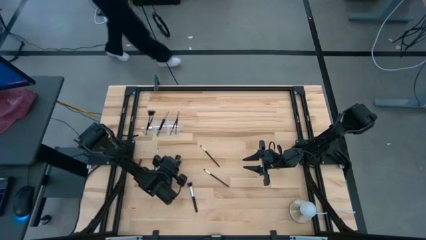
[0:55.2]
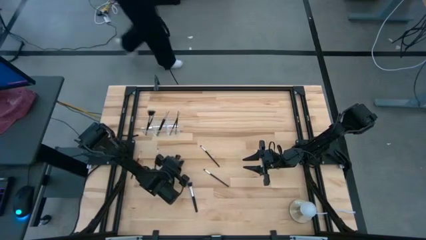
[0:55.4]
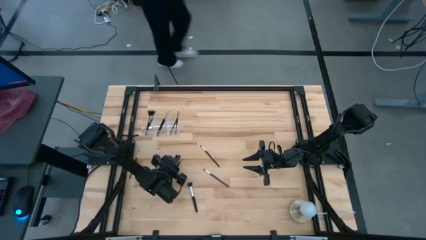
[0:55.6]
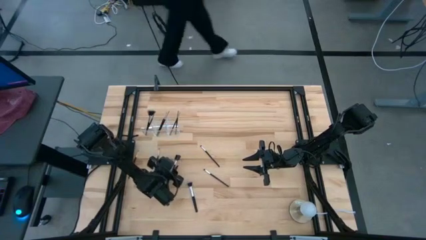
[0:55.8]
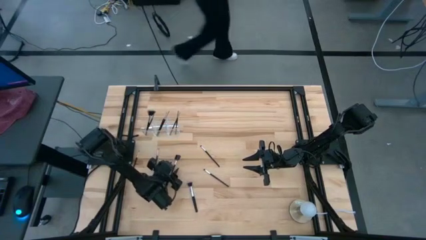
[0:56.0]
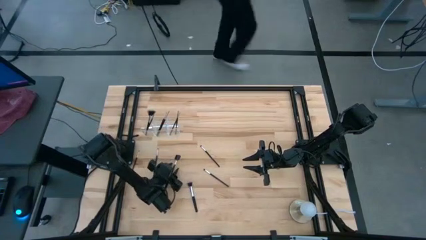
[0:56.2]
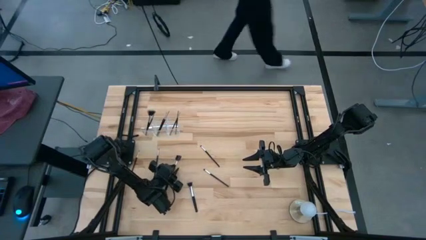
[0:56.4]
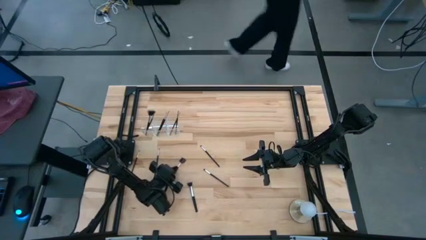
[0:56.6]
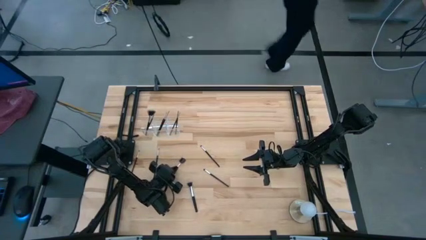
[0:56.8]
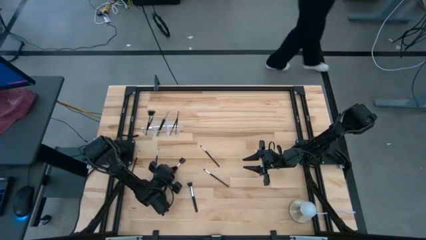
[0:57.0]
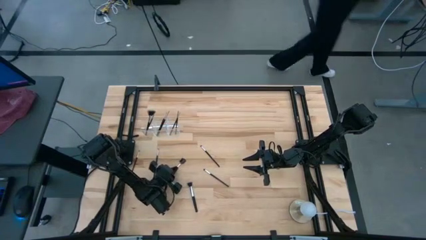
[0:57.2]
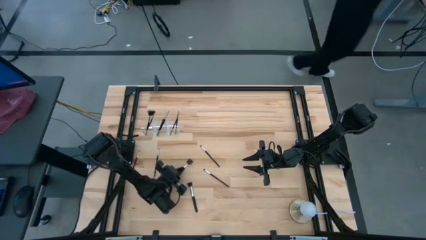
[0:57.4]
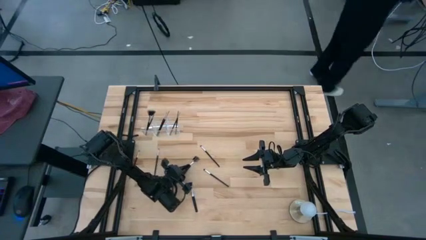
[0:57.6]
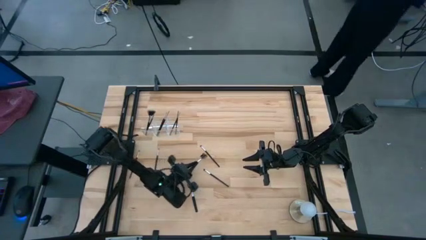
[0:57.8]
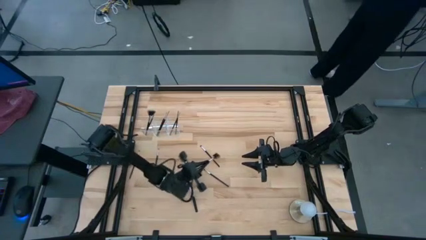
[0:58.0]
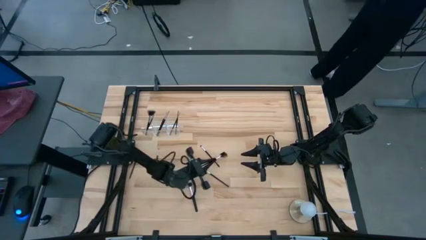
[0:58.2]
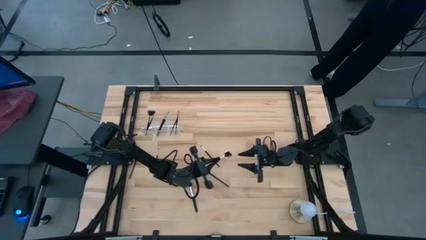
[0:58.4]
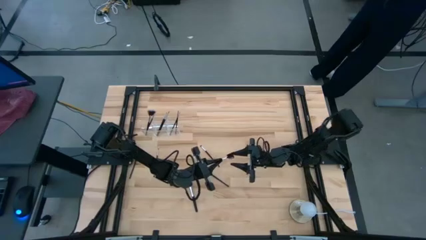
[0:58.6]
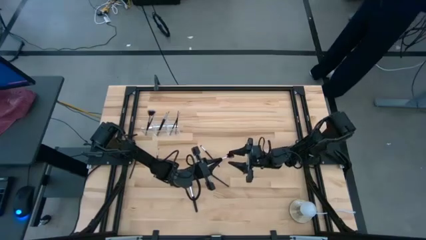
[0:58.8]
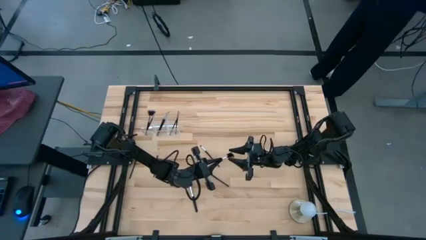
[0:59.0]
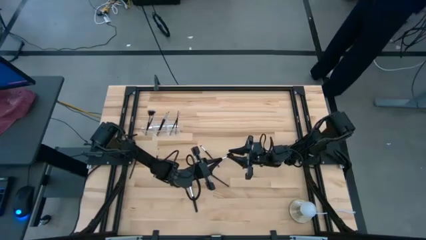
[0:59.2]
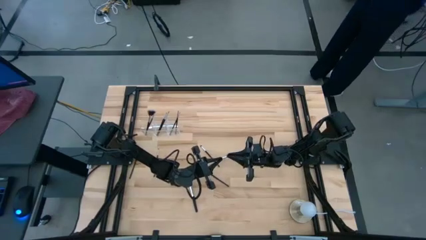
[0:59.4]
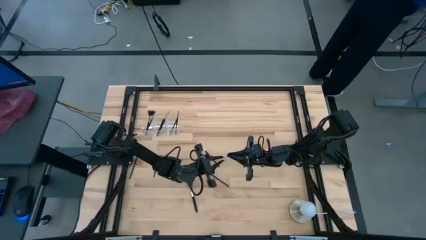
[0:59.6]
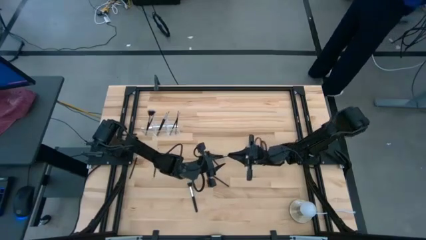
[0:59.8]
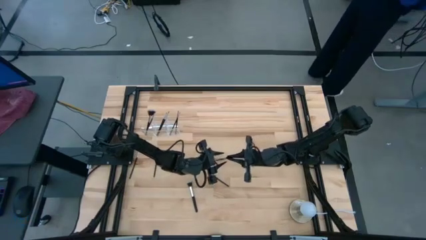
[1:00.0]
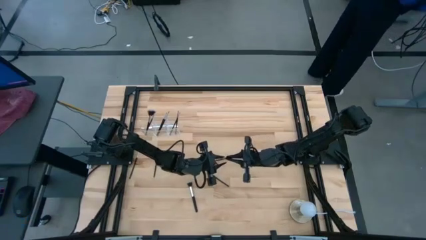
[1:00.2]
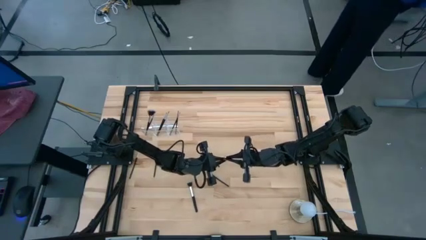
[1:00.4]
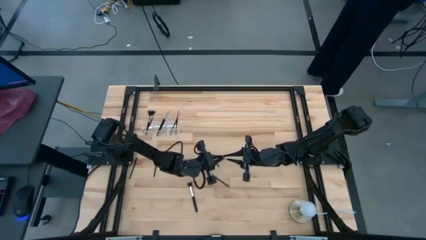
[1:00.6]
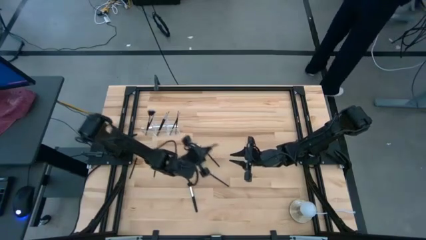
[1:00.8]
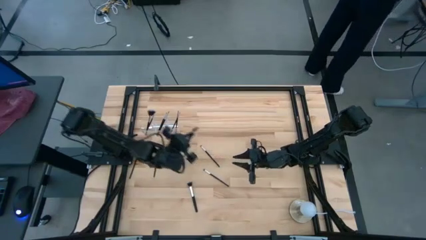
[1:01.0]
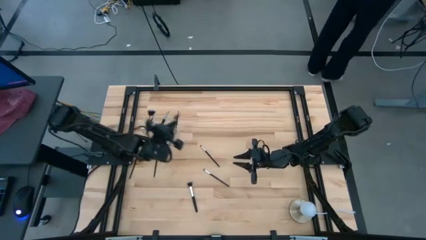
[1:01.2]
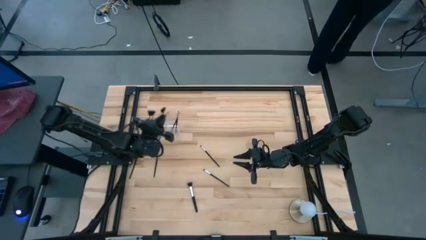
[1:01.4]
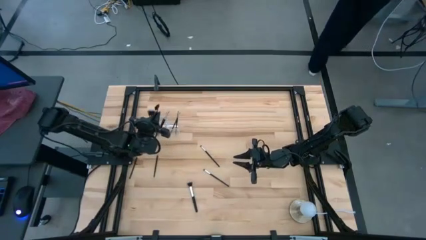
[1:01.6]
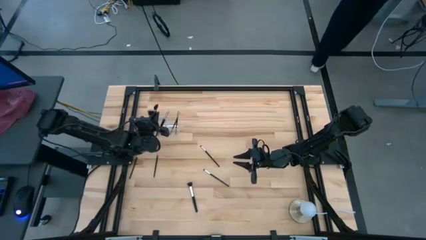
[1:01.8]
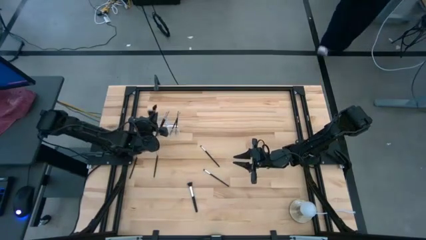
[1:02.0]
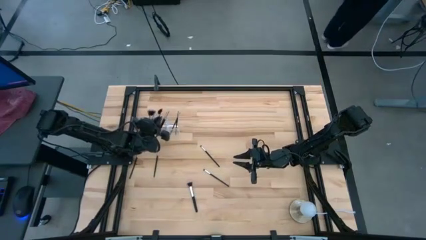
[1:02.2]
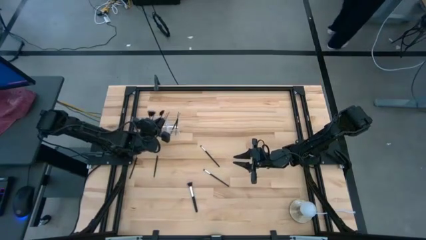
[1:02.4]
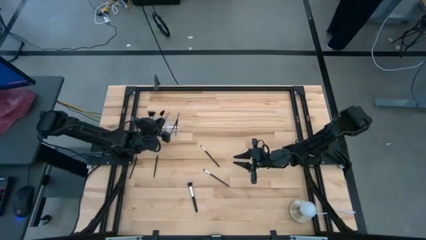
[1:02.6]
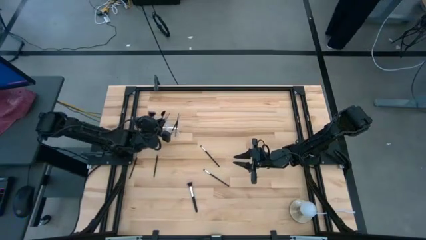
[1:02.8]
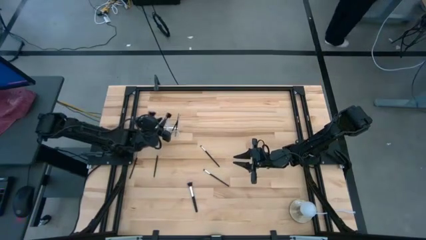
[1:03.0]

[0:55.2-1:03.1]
Task: Put items in baskets/containers
Put the eye groomer brush into the transparent organizer

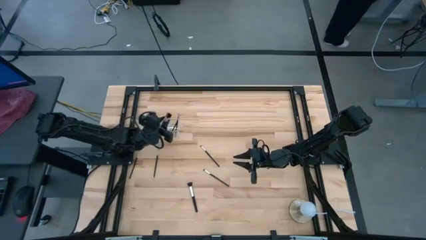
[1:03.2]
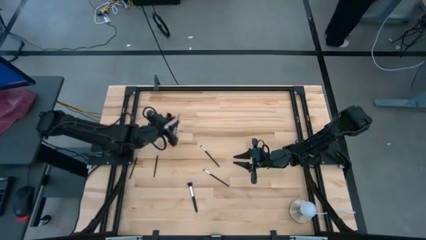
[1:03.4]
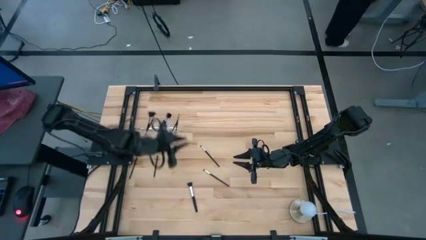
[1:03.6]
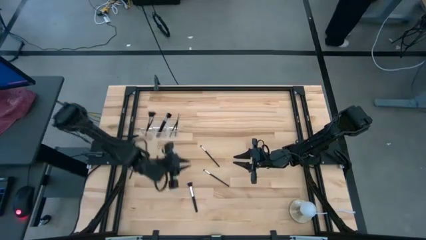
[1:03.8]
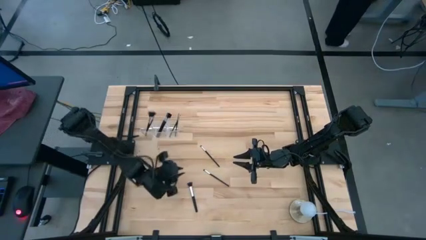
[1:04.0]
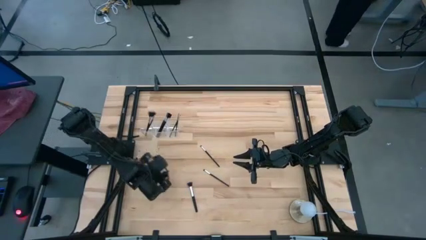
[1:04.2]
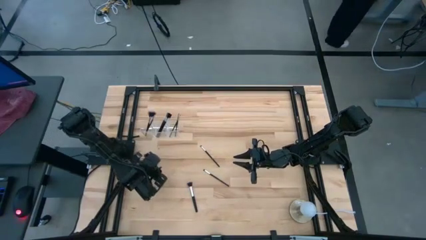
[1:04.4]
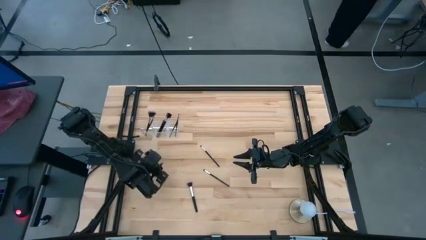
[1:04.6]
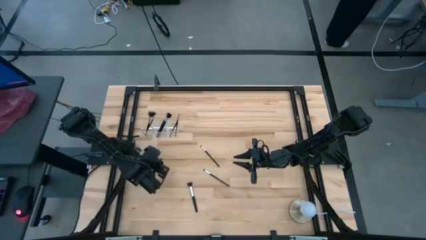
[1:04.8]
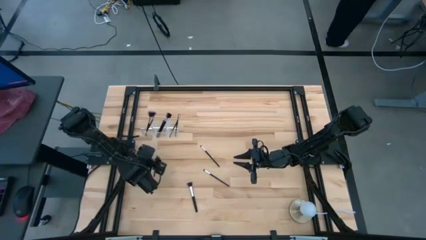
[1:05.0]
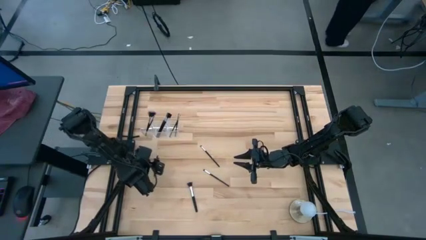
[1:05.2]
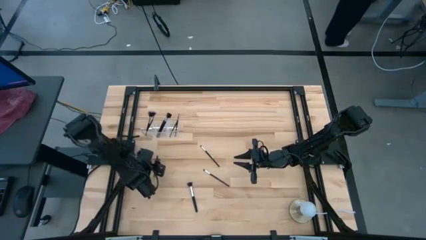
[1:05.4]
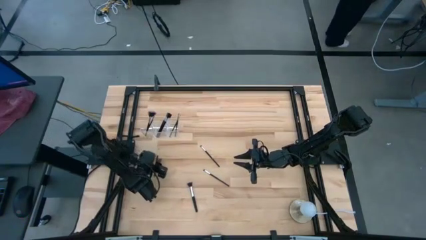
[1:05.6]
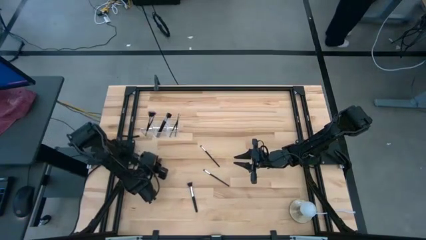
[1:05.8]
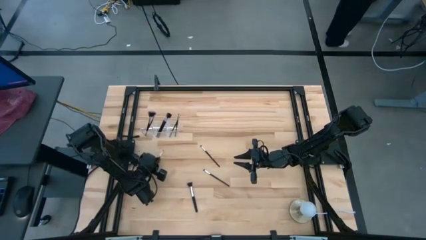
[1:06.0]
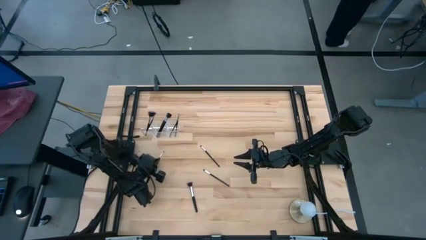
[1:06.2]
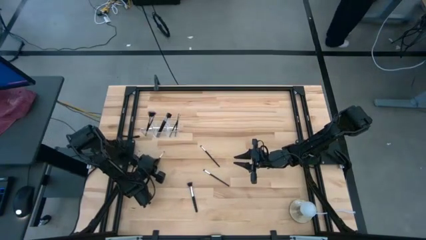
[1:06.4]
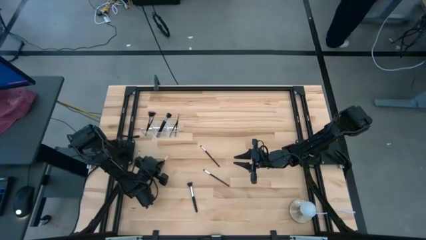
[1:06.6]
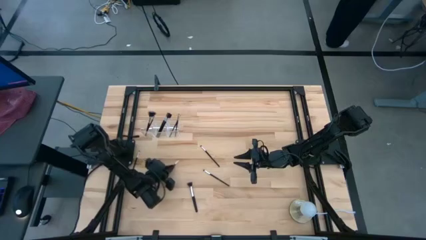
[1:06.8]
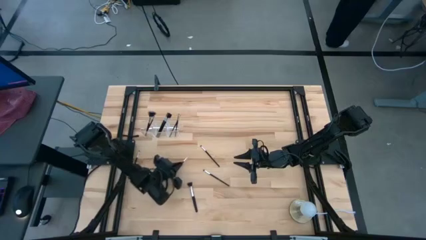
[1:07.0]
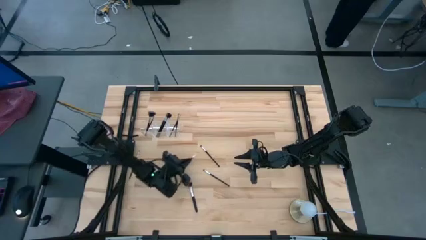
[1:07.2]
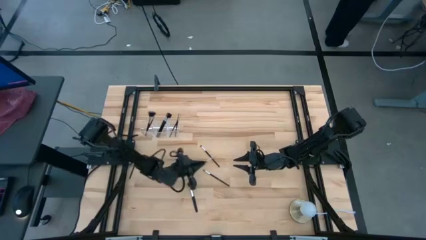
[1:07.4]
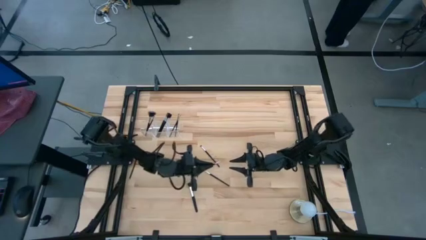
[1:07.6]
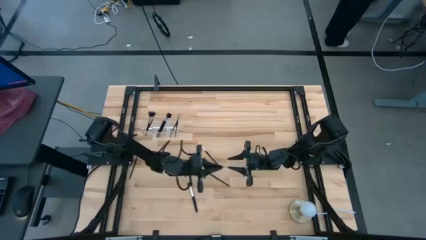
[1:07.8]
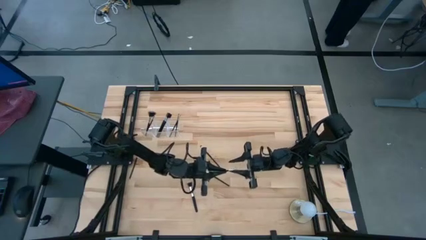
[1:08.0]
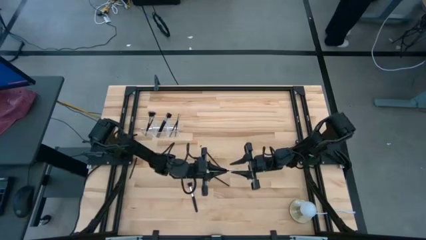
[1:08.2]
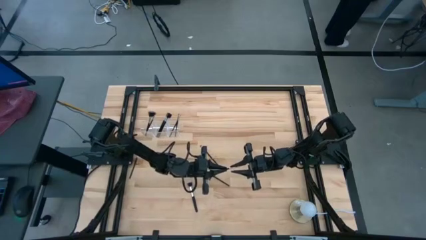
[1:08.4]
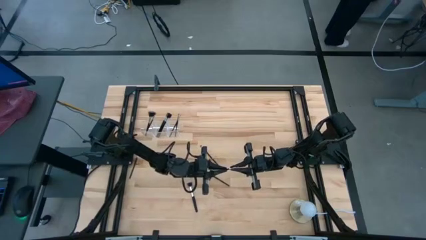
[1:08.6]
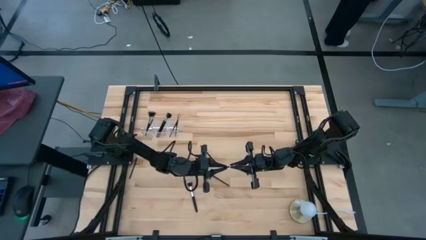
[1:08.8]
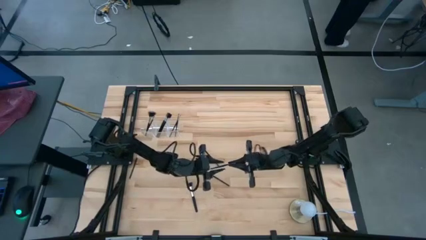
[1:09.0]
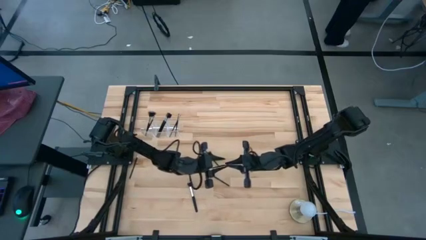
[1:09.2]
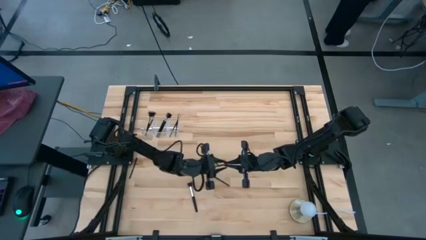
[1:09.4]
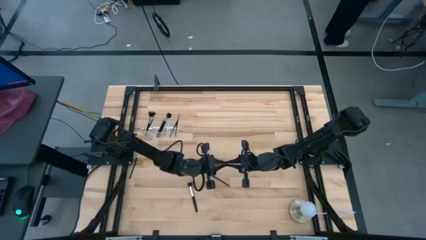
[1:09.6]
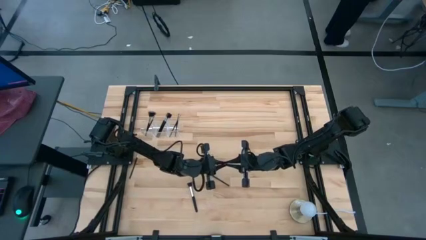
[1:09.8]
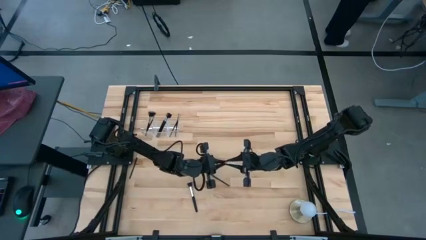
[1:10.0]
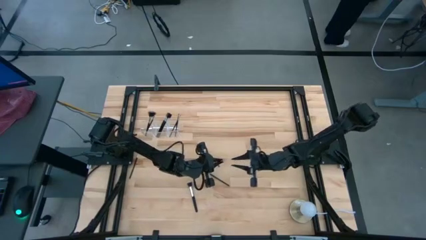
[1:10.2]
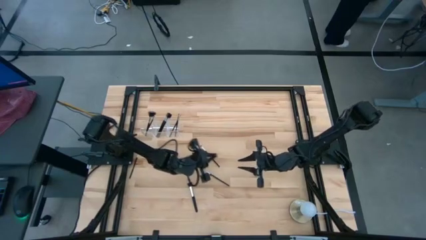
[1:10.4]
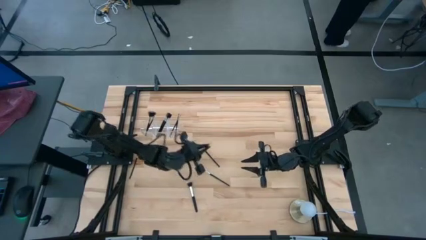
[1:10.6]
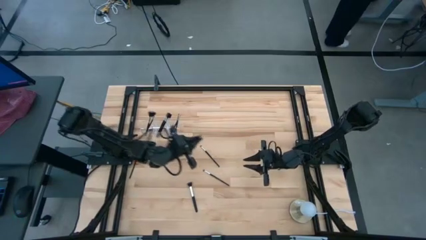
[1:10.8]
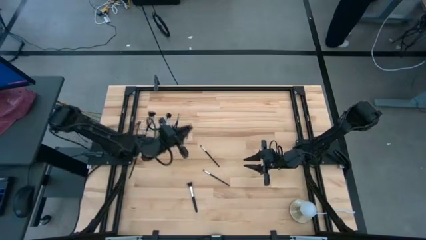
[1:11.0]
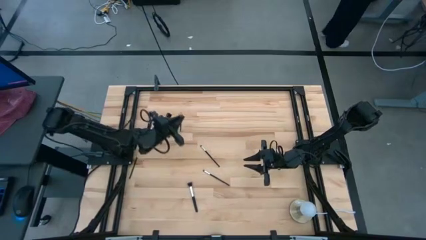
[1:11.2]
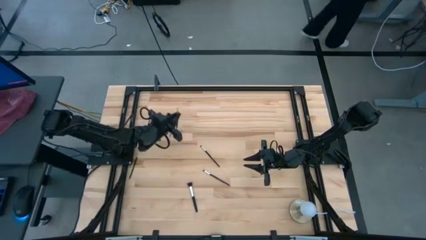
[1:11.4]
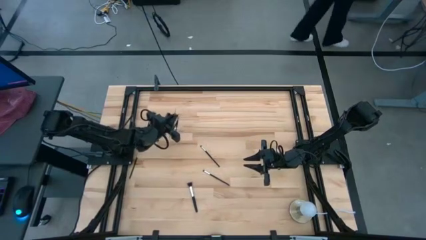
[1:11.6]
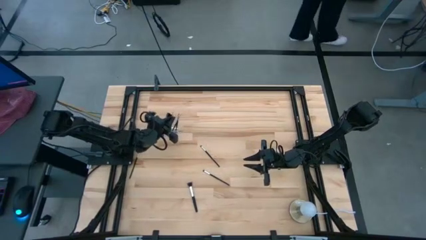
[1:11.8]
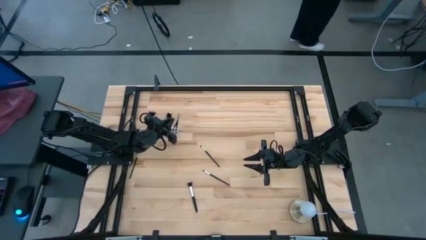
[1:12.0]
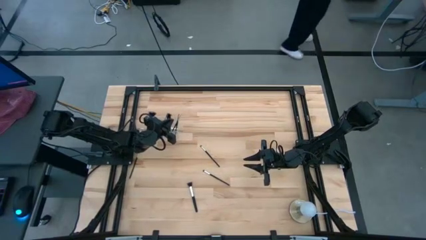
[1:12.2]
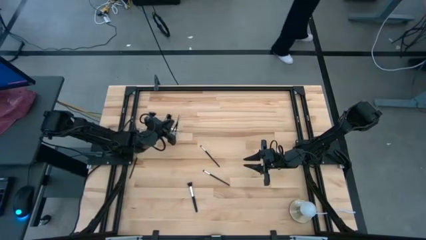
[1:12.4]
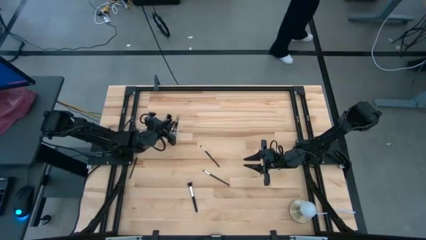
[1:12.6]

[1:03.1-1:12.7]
Put the eyeshadow brush into the transparent organizer
